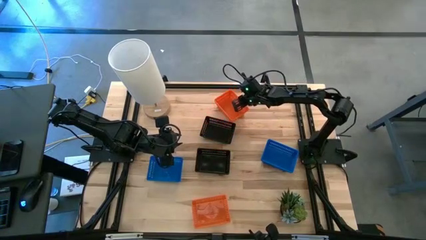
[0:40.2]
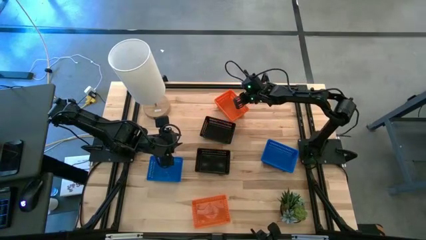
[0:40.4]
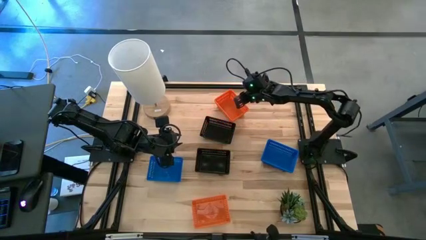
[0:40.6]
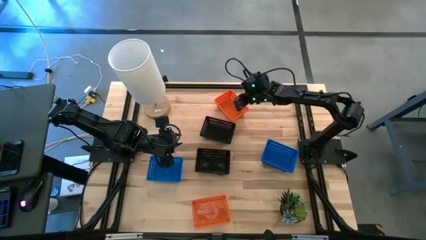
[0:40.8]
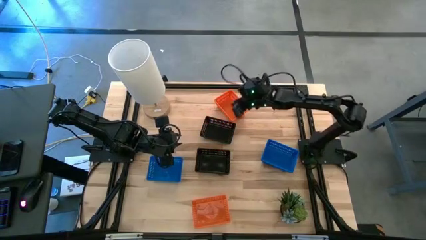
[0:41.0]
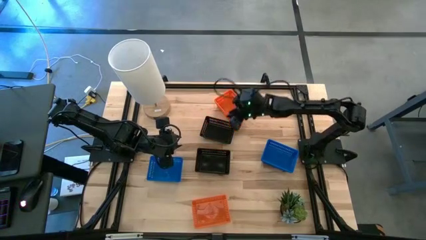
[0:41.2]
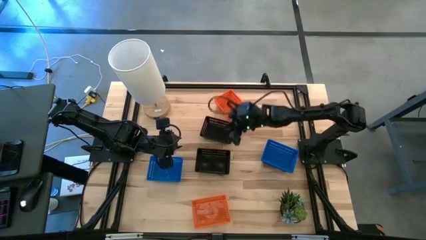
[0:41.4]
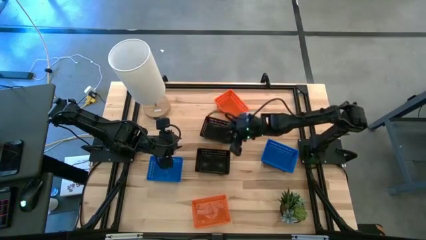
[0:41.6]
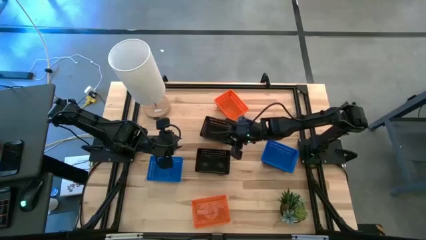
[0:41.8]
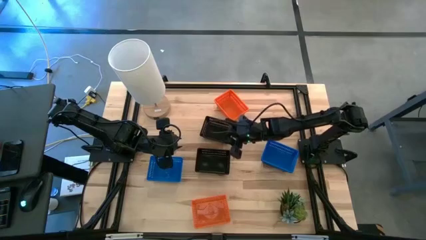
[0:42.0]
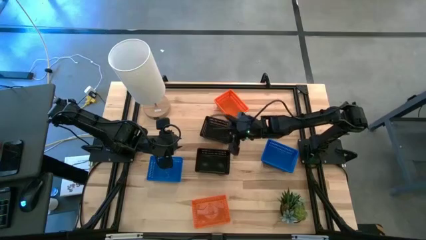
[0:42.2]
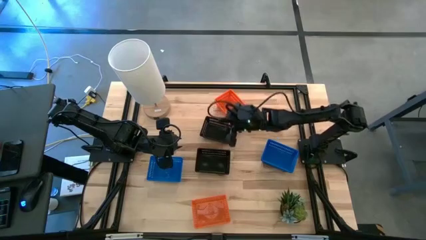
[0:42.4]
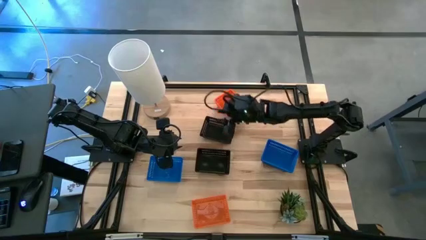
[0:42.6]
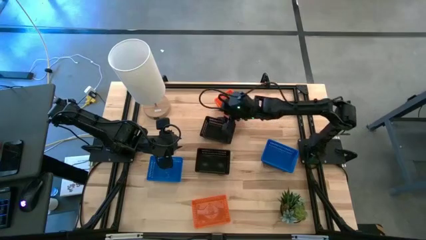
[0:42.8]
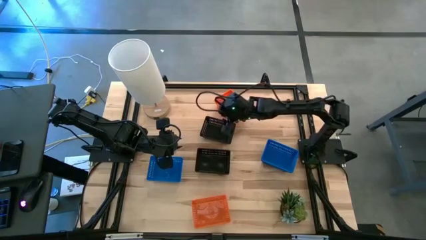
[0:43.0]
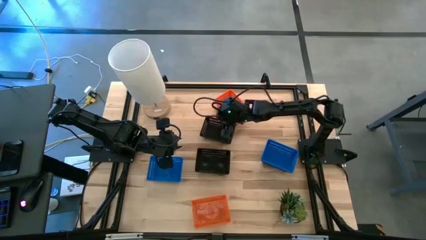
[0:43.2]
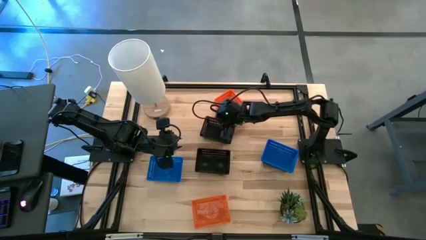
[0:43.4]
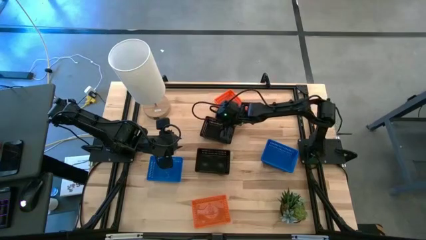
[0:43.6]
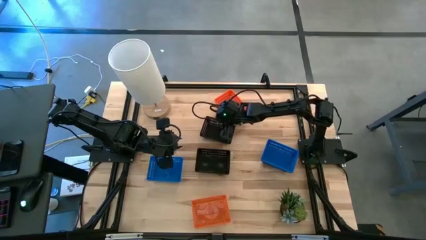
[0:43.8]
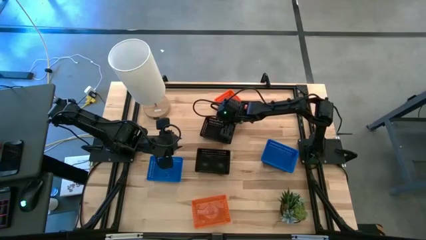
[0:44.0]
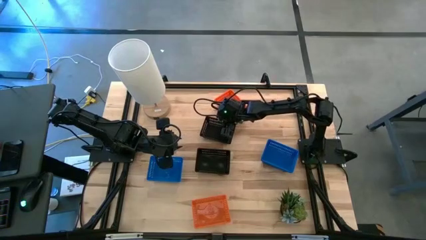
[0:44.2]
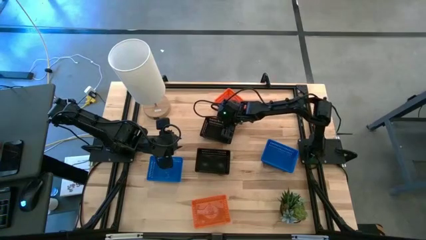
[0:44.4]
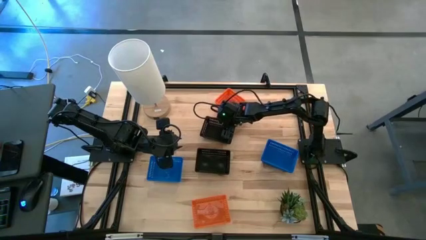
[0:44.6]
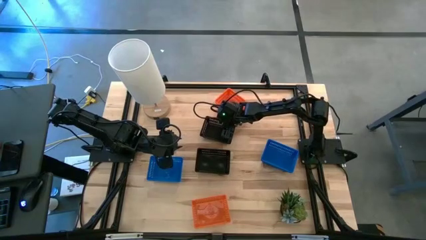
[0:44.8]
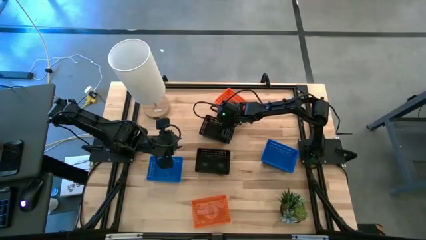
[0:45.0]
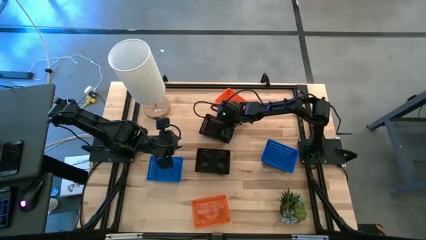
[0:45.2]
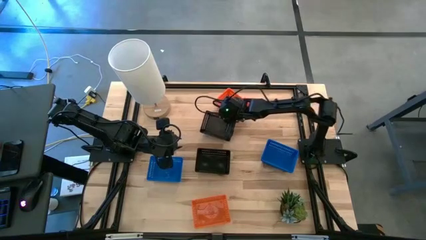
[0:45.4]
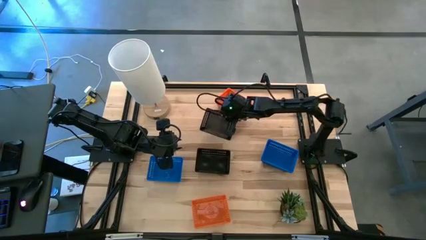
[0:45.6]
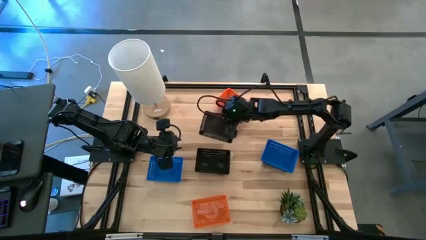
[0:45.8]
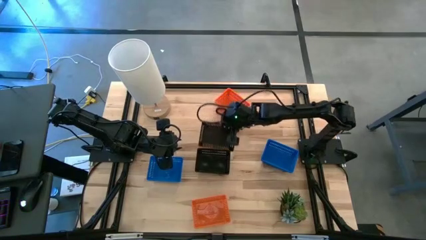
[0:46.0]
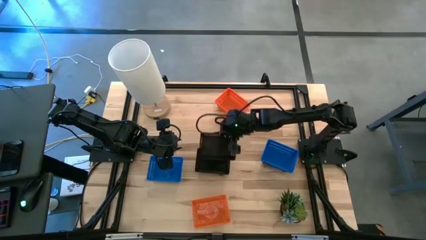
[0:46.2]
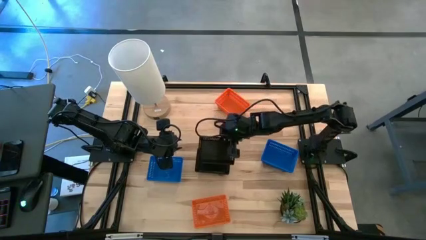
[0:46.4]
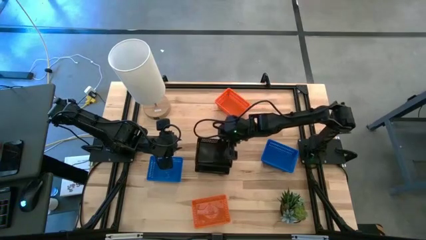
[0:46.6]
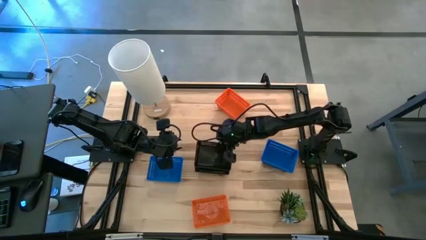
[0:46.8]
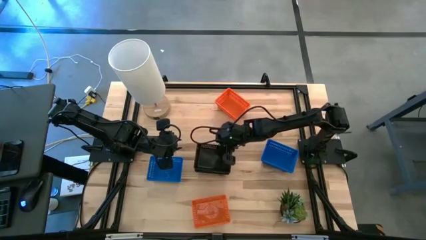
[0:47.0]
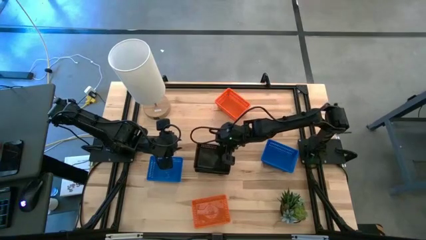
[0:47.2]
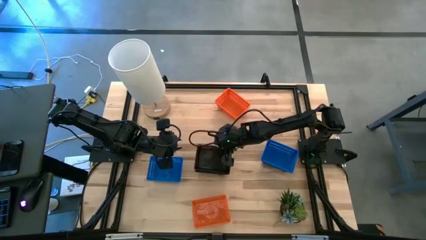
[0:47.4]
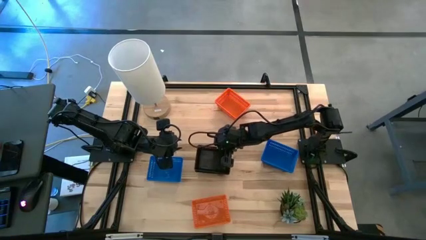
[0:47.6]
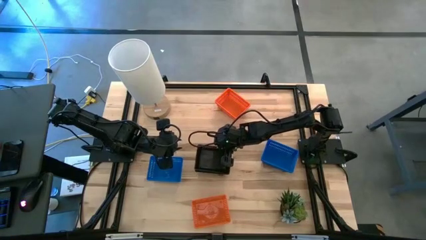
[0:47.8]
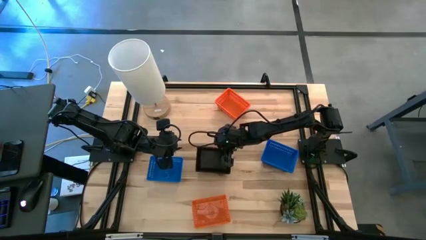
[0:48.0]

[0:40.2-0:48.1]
Stack the top black bin on the bottom black bin

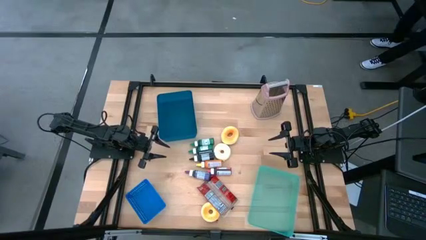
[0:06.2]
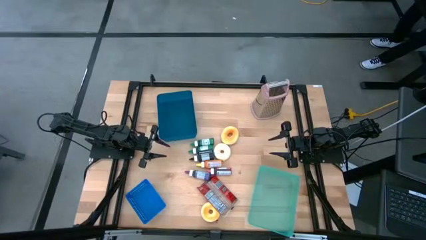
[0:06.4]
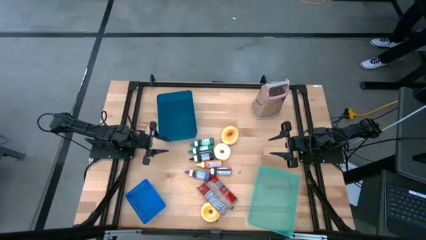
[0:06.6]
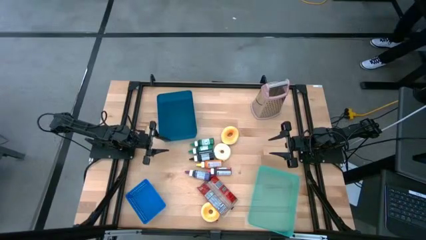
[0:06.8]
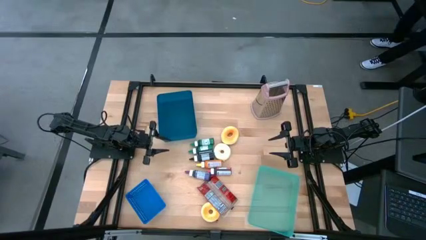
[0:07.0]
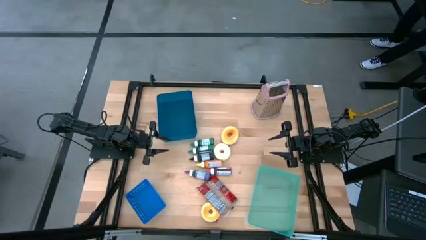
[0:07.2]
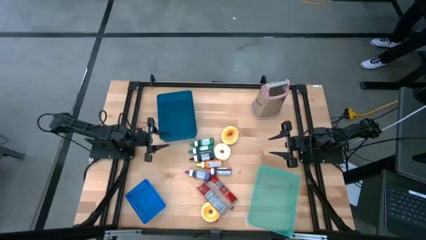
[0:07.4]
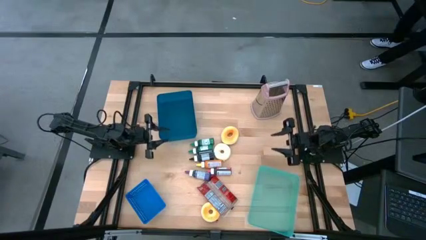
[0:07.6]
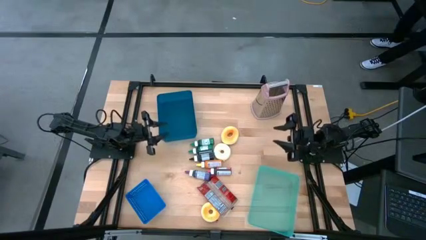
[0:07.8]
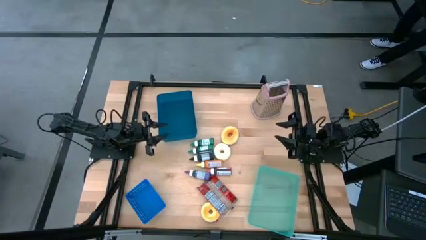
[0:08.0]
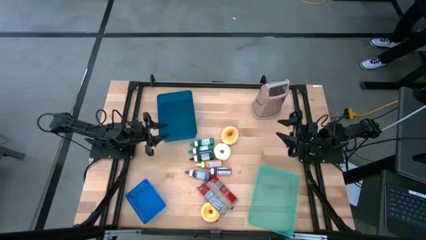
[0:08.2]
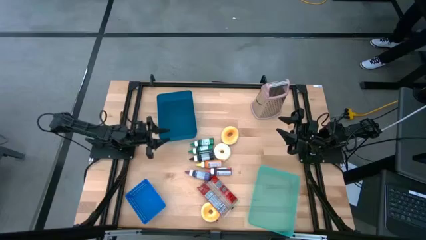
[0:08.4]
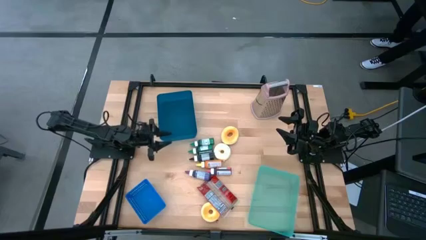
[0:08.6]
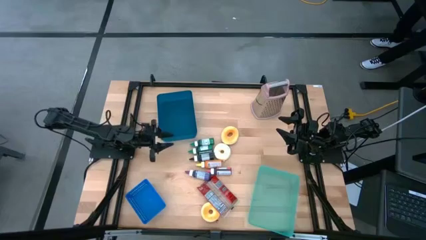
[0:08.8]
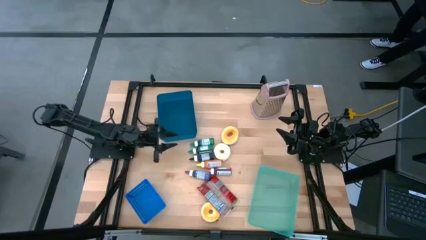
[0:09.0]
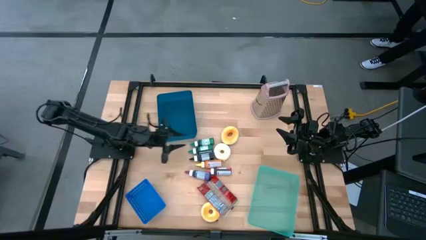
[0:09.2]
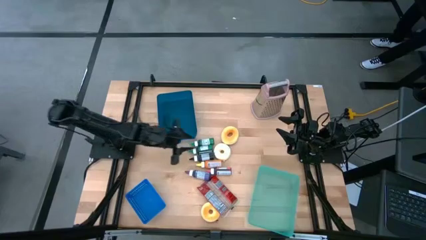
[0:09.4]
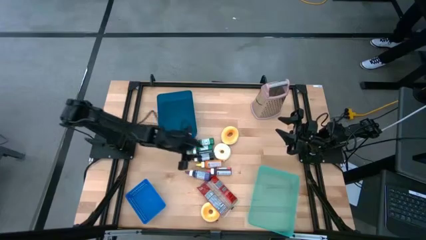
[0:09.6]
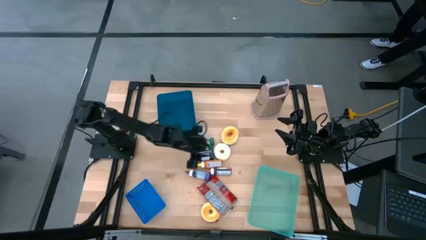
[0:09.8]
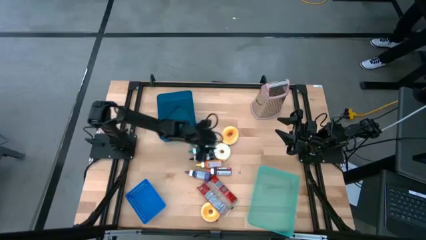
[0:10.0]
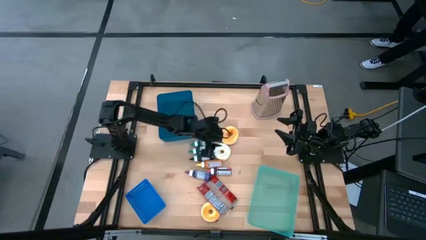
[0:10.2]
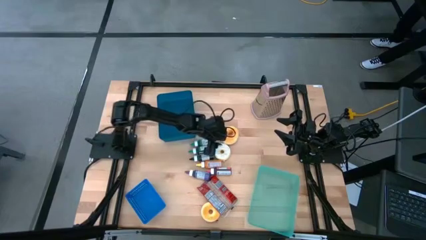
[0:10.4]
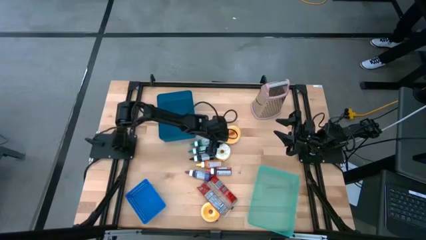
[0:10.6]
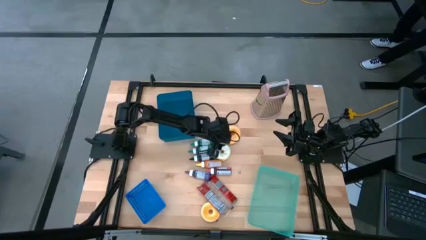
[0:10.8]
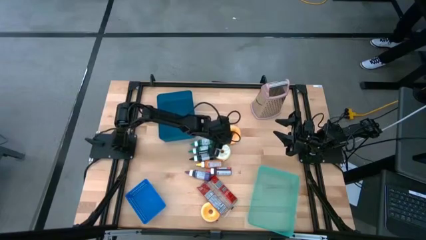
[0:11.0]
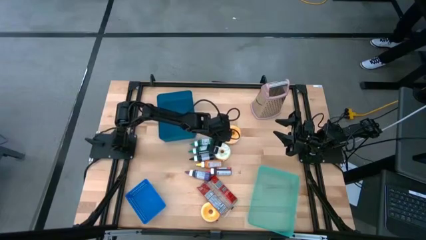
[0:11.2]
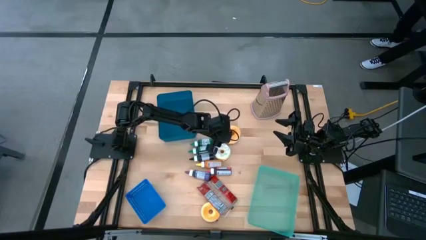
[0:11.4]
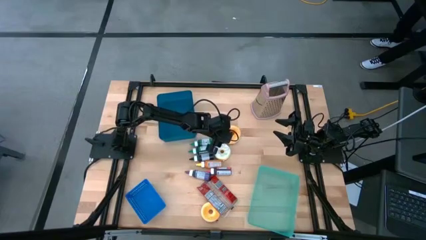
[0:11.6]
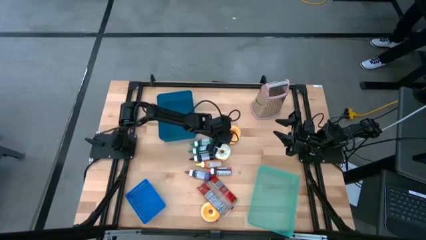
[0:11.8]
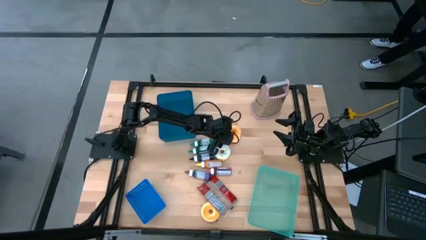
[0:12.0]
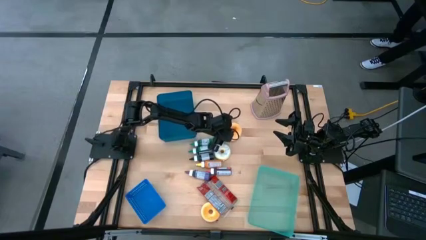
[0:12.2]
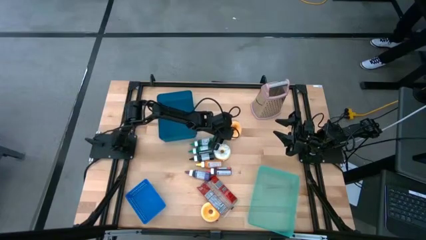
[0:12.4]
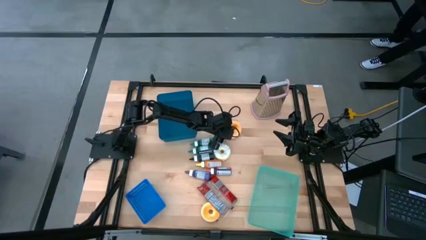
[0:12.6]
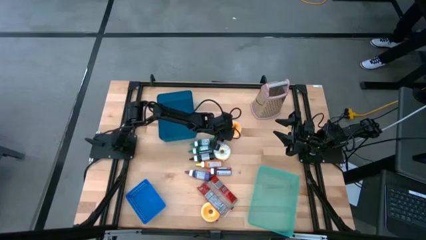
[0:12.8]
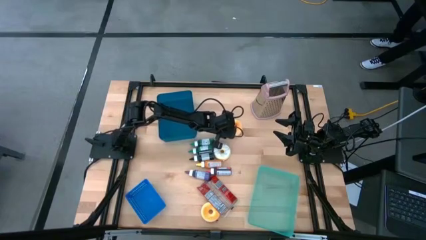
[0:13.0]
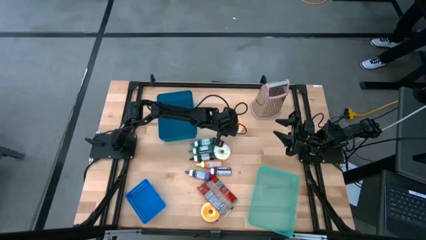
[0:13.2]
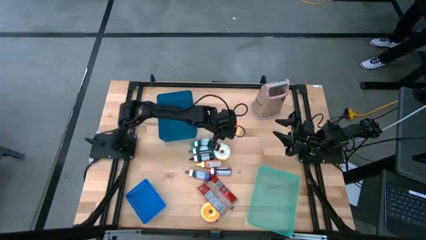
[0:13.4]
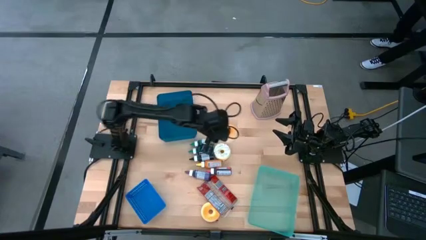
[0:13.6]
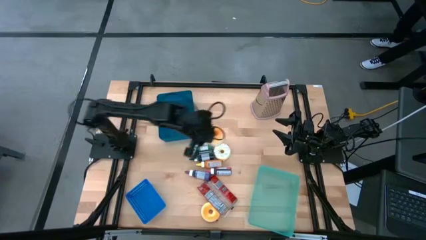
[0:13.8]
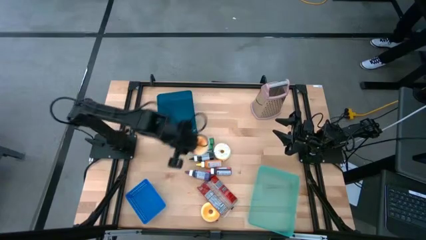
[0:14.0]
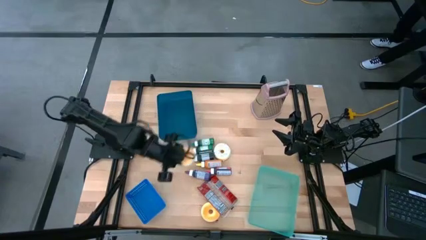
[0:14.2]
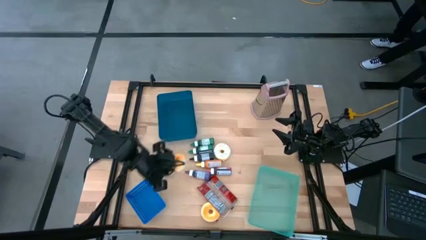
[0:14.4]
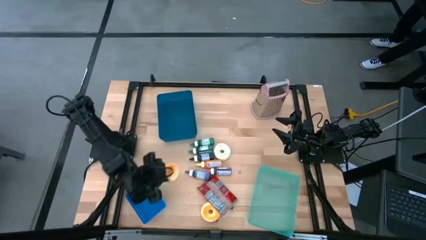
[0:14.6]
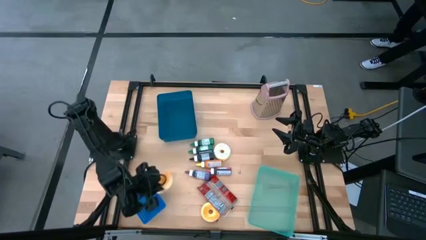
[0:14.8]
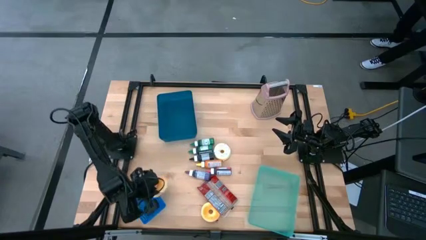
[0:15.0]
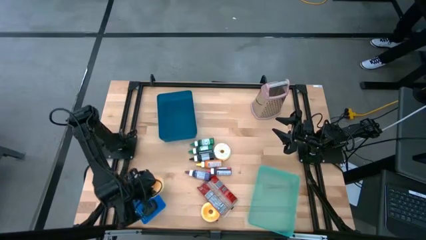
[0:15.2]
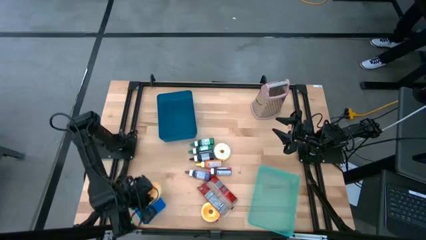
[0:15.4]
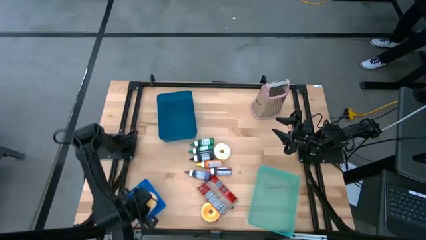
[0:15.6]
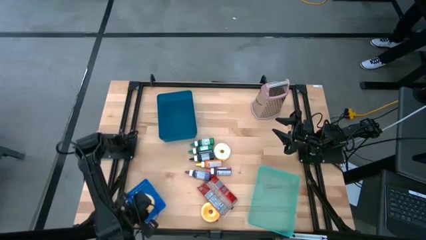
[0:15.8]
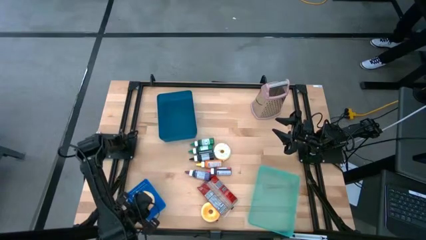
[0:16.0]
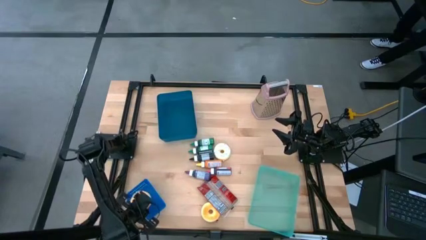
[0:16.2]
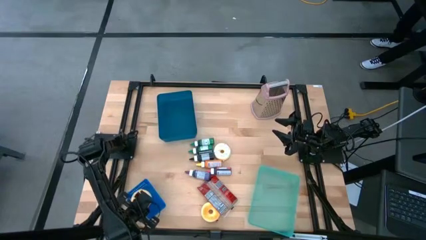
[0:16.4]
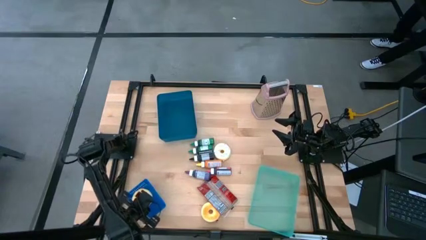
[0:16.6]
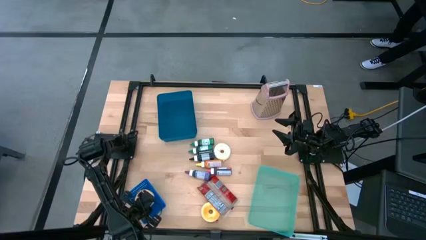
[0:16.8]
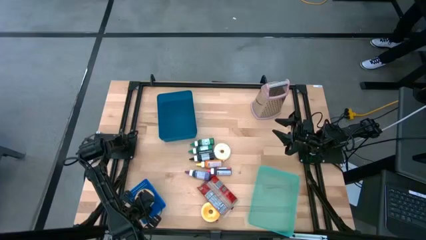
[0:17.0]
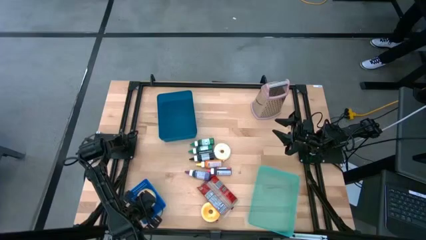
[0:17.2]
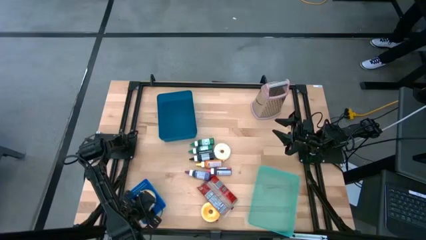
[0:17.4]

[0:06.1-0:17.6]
Put the top orange donut into the blue bin
